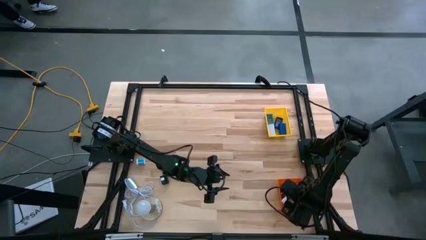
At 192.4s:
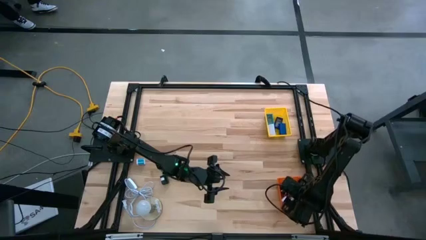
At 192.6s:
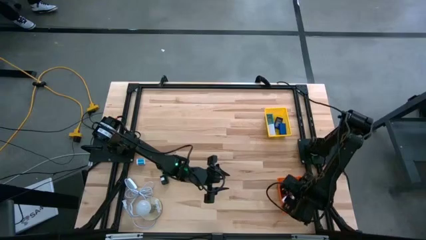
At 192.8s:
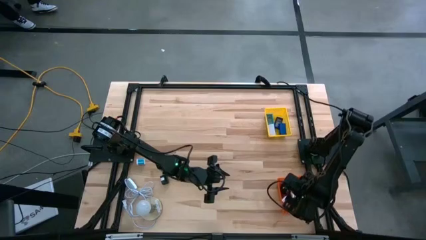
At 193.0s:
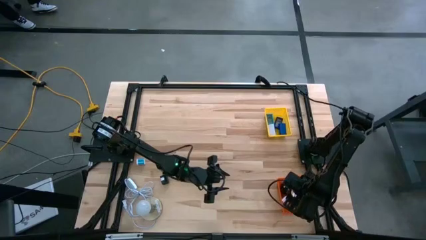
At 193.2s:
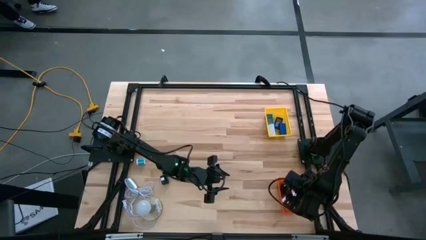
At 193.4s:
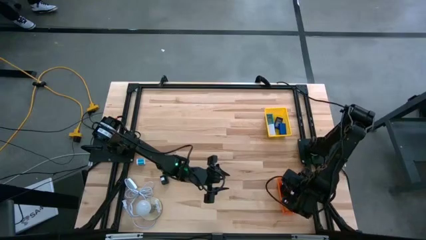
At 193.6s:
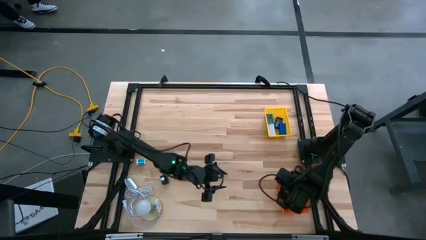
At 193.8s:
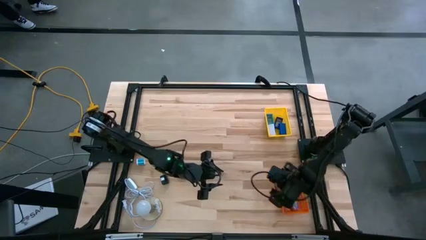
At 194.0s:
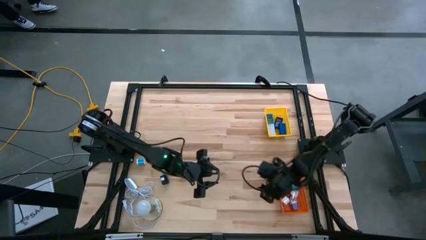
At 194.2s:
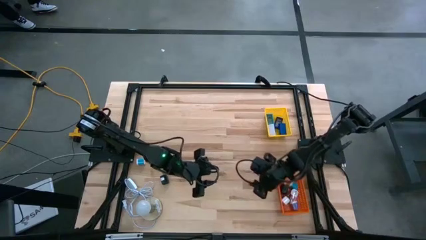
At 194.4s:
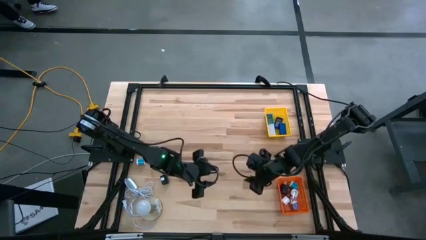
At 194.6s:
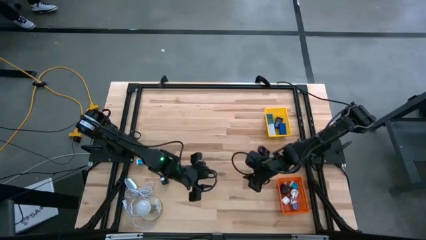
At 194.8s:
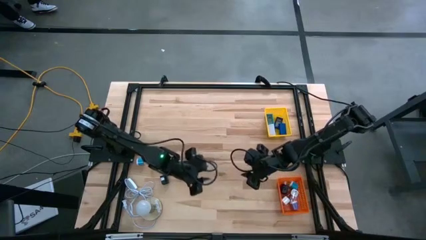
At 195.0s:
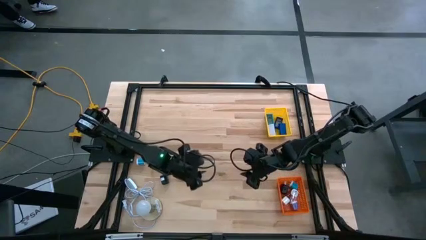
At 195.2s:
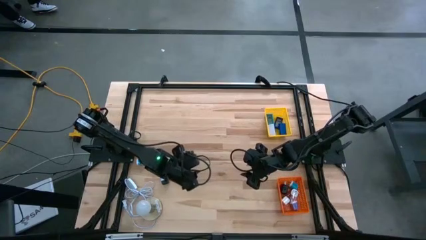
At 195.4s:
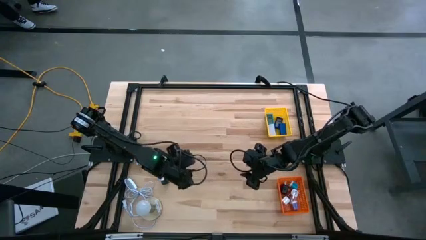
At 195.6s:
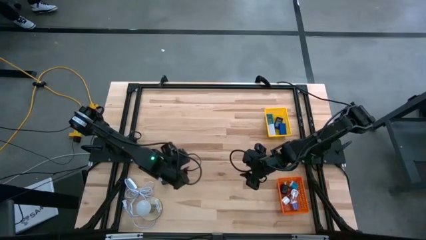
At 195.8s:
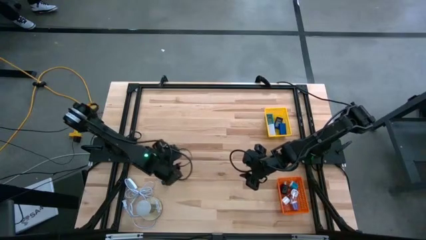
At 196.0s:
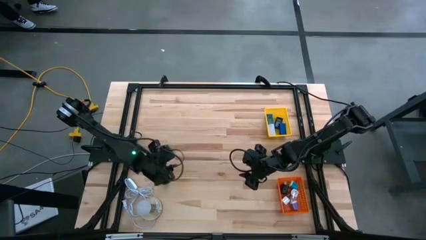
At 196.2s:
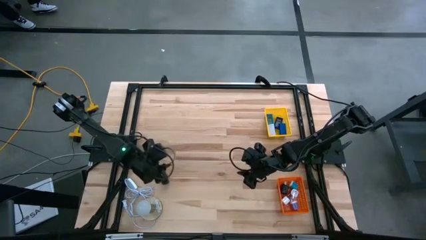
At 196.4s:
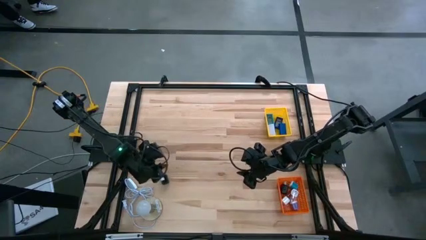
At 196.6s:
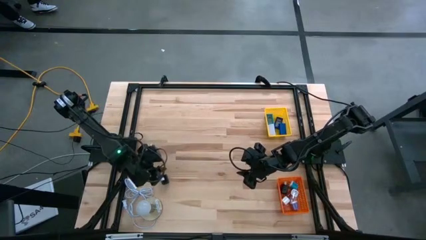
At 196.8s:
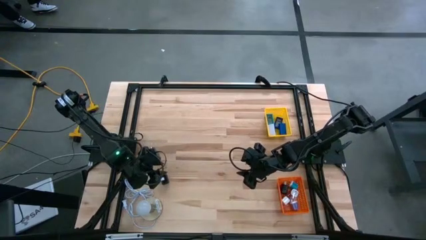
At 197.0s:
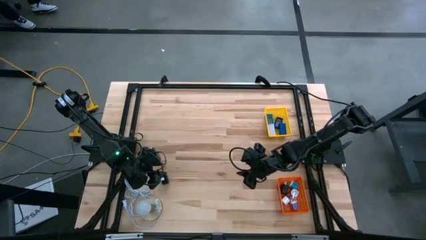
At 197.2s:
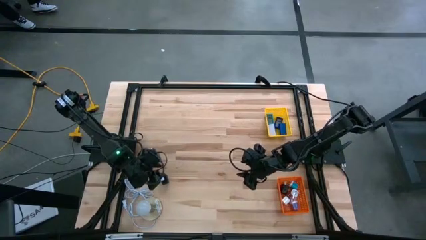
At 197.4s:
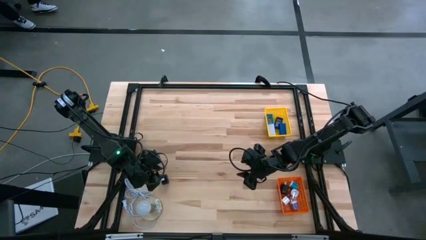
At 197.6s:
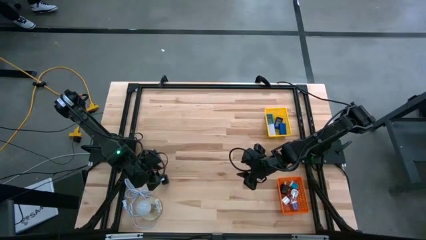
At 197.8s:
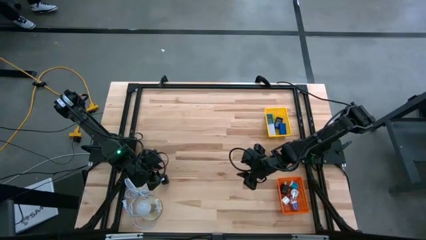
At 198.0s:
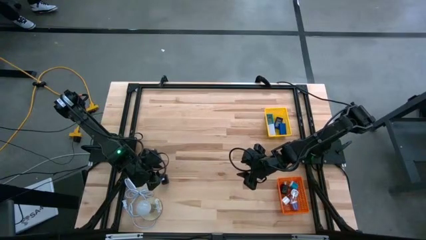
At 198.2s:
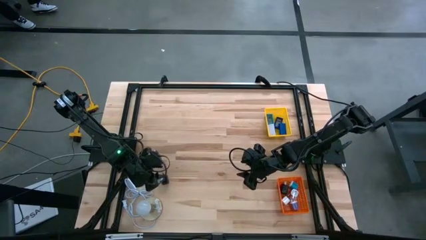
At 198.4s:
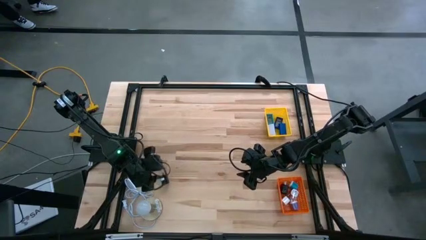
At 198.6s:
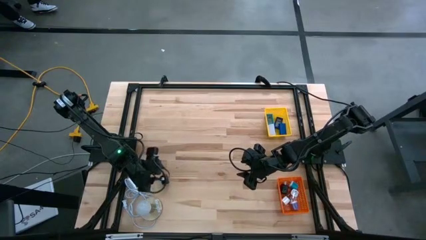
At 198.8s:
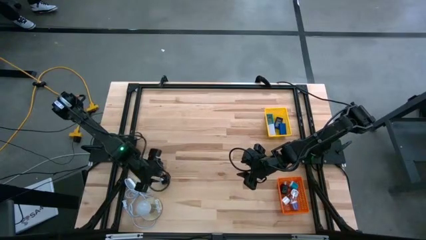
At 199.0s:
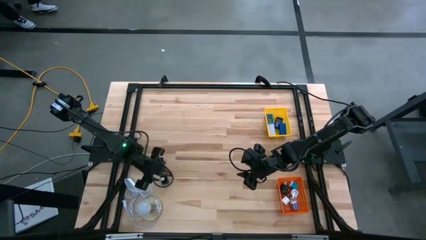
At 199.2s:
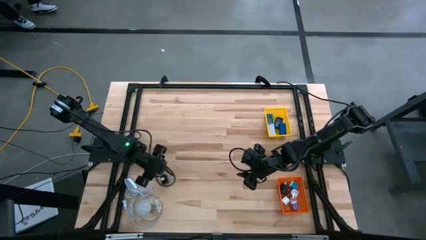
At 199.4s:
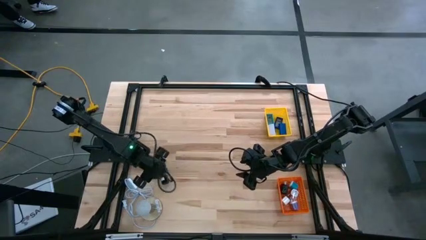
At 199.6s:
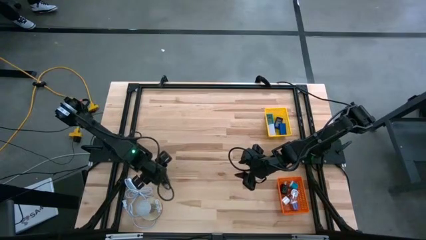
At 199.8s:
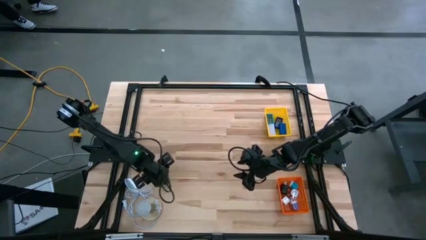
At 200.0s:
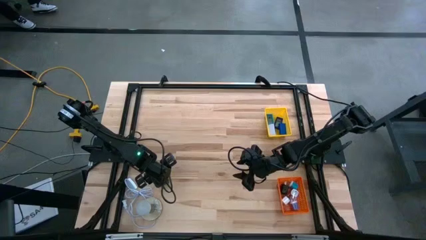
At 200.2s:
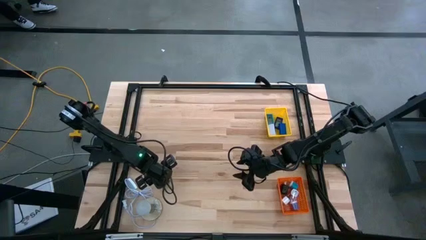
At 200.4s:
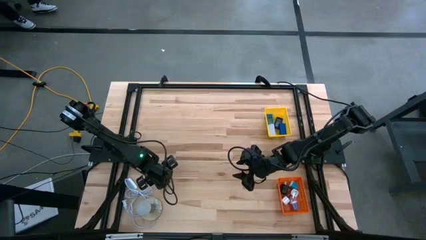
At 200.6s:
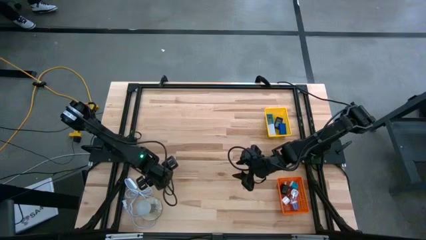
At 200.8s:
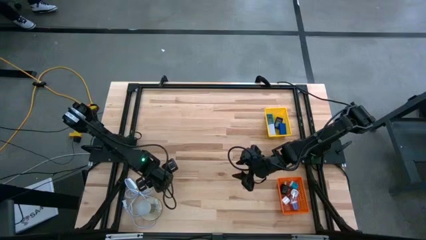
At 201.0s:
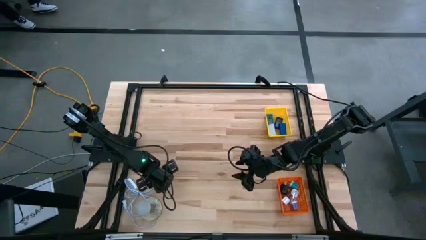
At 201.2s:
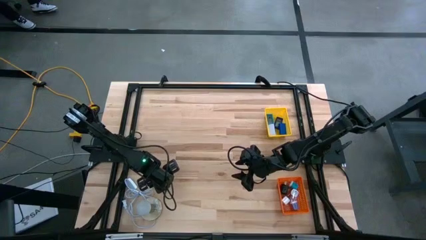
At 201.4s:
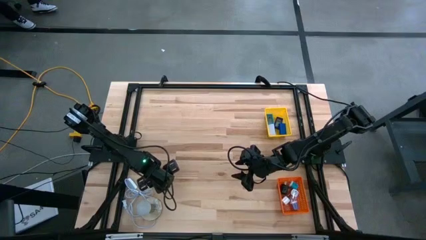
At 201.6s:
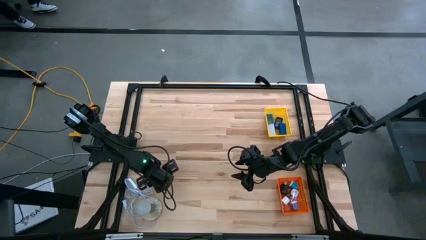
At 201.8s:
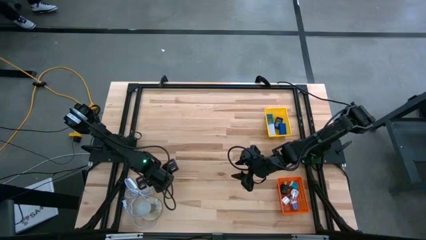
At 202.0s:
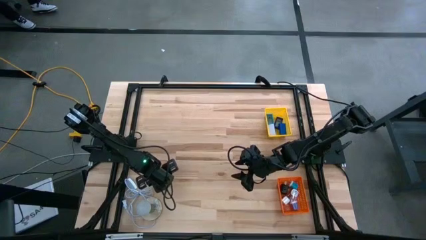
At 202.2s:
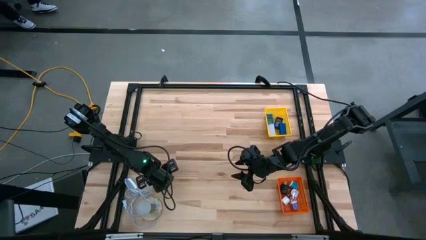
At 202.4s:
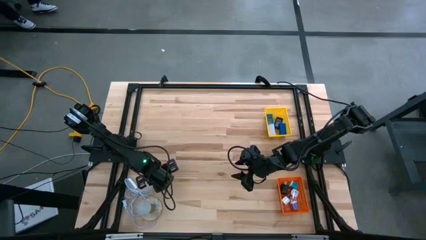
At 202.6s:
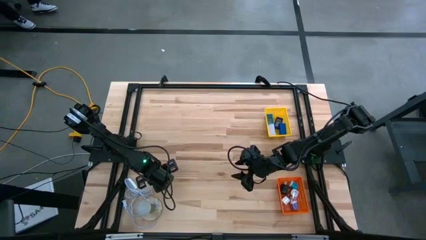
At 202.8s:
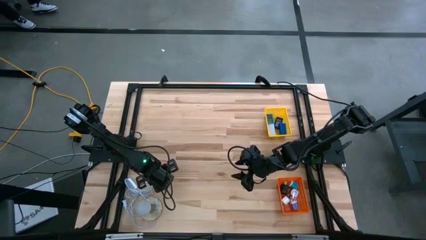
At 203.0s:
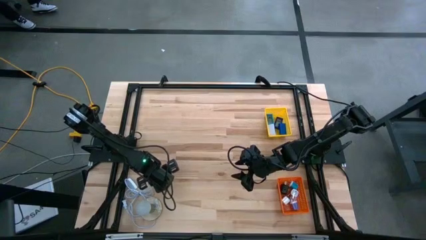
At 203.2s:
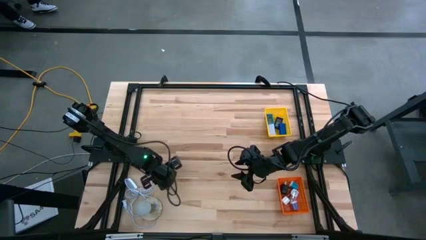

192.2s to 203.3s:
Task: Pick & Place Office items
Put the black charger adapter into the orange bin

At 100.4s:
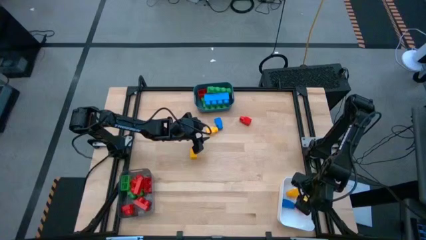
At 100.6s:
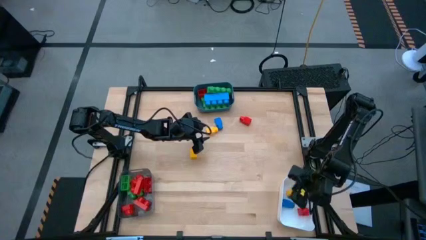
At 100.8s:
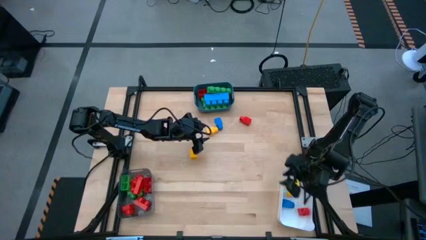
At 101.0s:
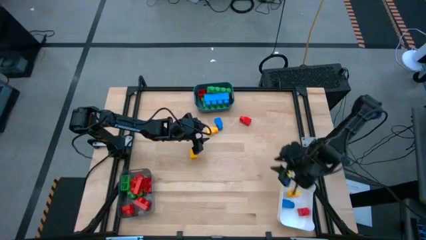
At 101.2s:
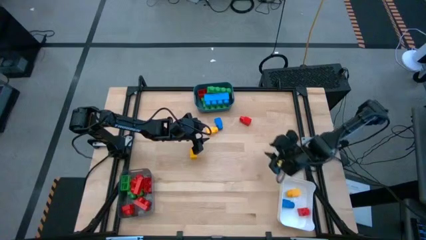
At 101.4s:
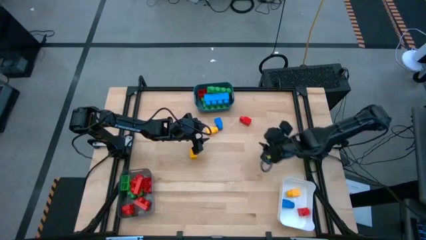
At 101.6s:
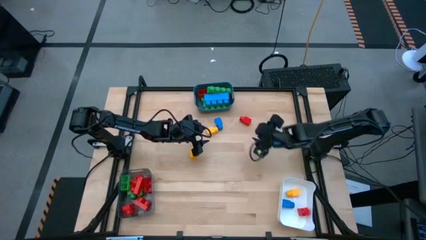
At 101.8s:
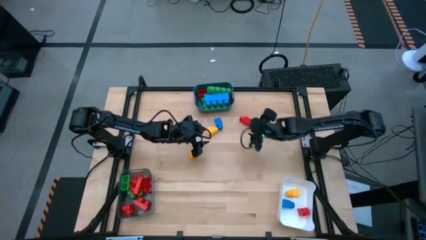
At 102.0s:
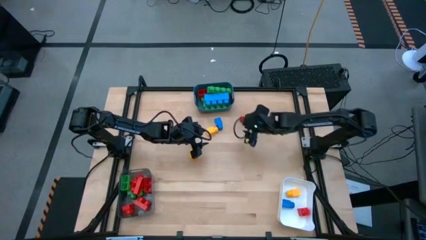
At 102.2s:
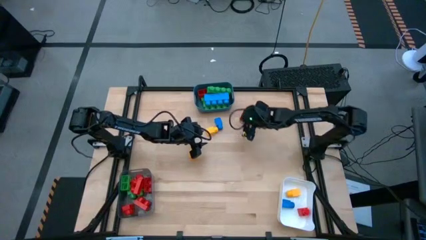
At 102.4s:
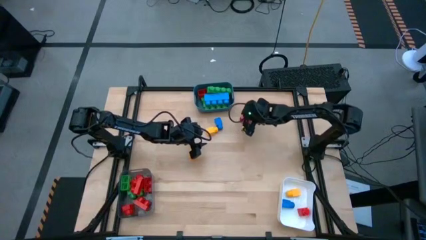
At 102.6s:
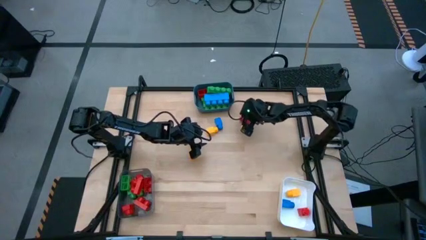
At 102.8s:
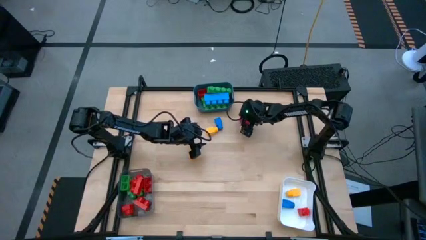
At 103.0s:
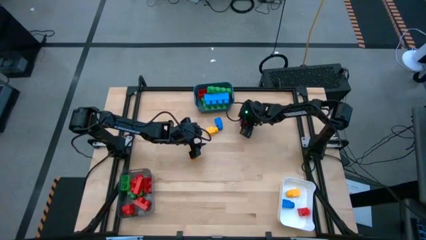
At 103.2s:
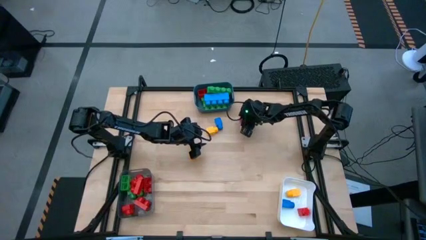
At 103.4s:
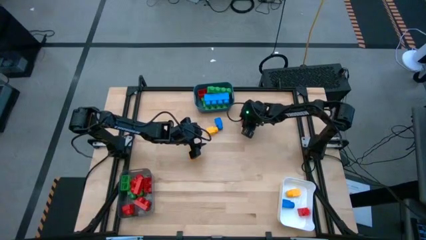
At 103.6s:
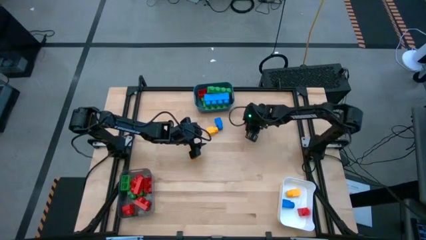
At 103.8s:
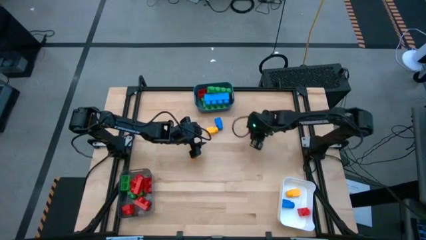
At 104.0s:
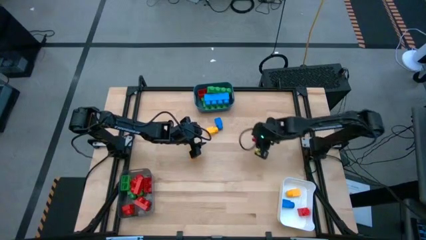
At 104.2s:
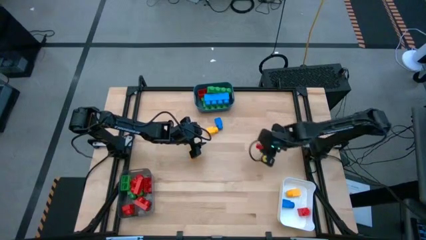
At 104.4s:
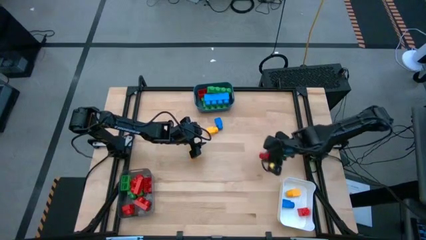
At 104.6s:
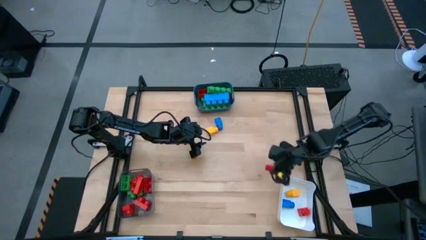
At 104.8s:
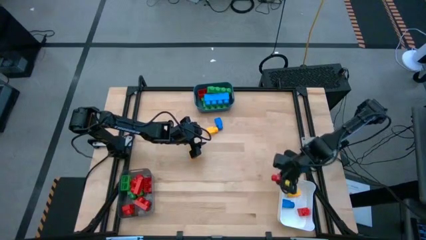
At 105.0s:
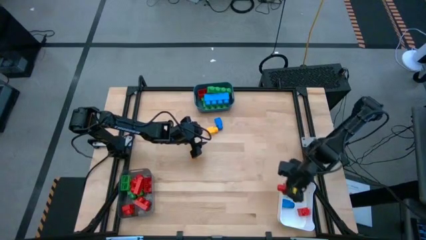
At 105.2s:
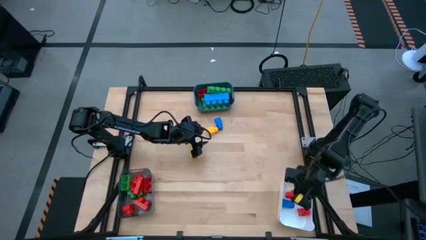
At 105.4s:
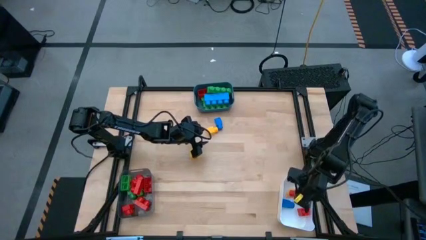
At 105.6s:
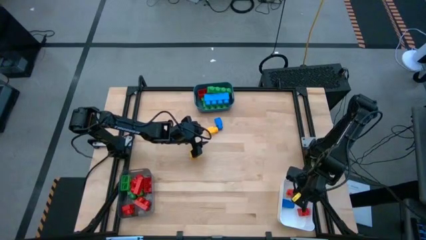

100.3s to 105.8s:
Task: Sort blocks by size
Put the game piece into the white container

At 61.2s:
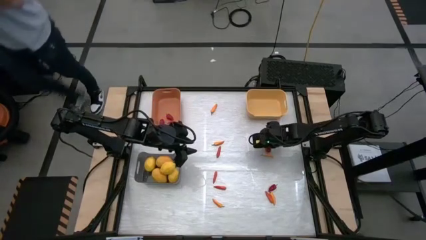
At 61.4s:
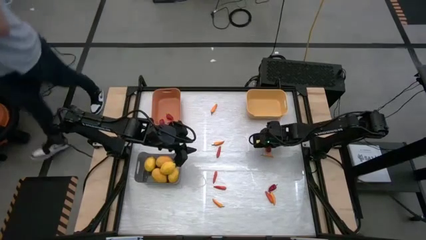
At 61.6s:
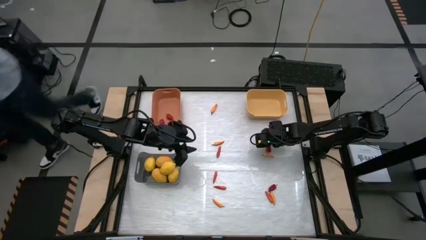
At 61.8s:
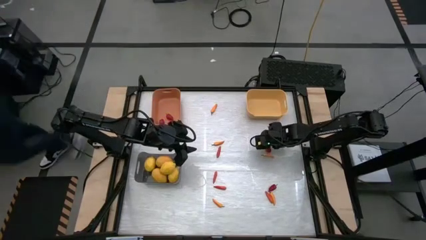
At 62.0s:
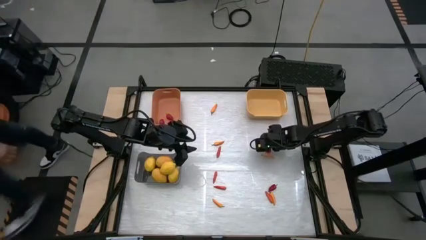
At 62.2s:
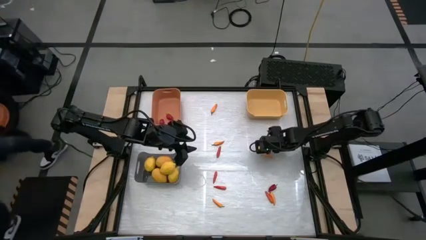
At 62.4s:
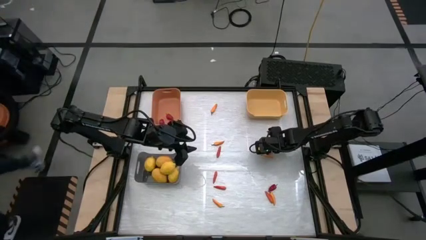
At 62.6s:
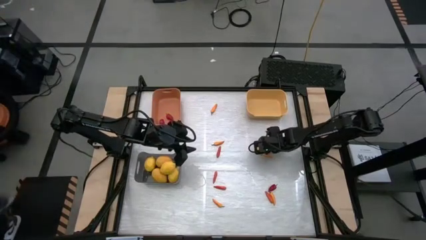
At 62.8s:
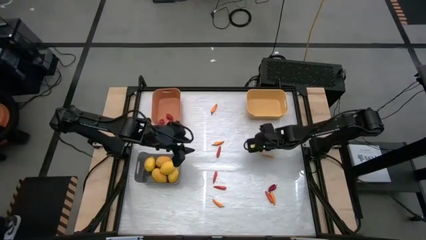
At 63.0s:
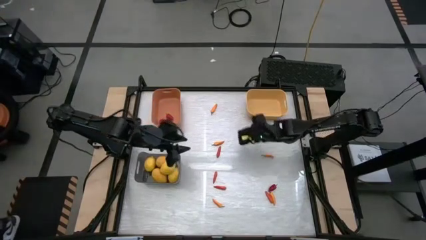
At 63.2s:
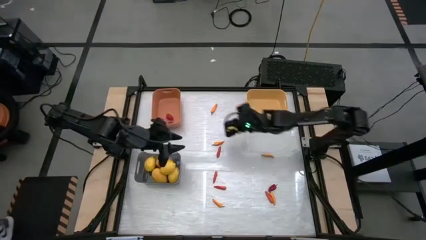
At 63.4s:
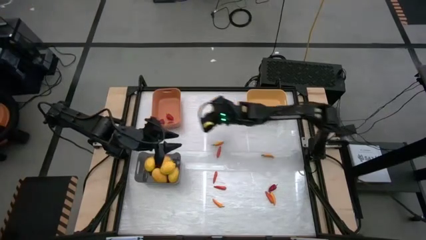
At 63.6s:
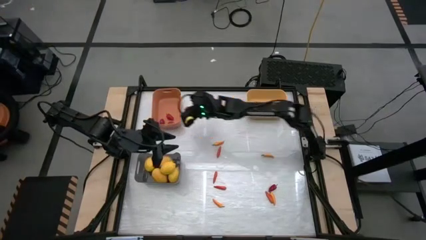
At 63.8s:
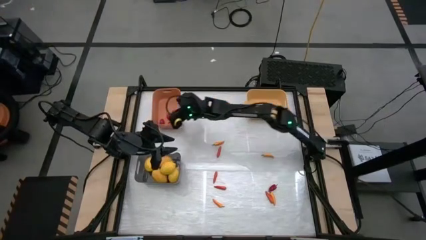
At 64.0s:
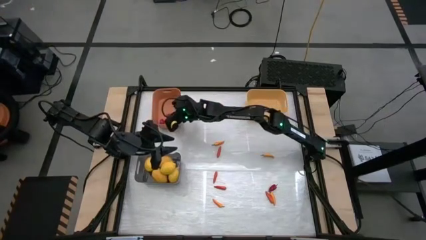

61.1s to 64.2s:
Task: Sort produce into baskets
Put the red bell pepper into the orange bin
